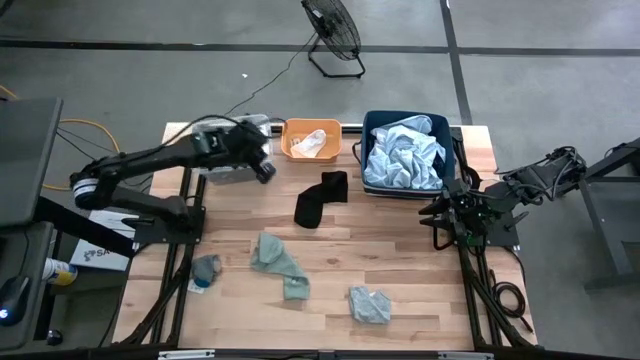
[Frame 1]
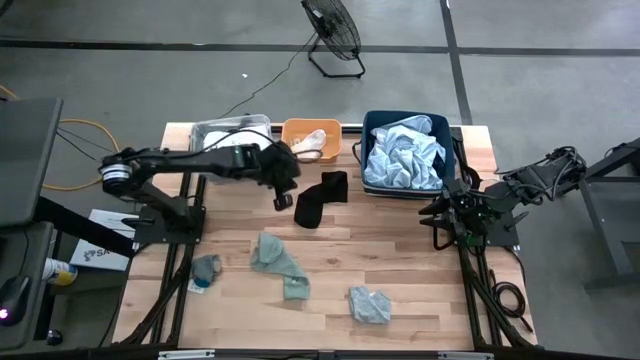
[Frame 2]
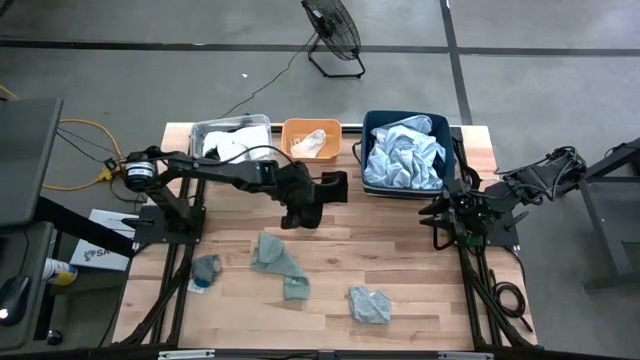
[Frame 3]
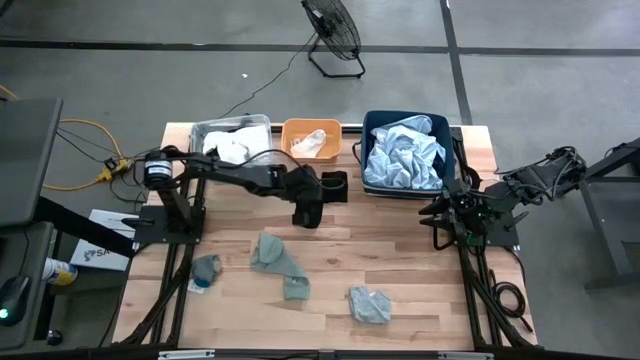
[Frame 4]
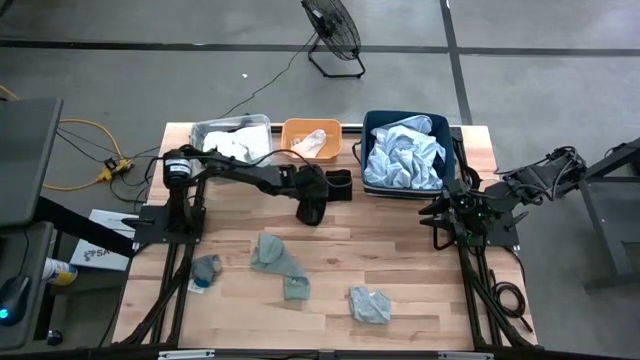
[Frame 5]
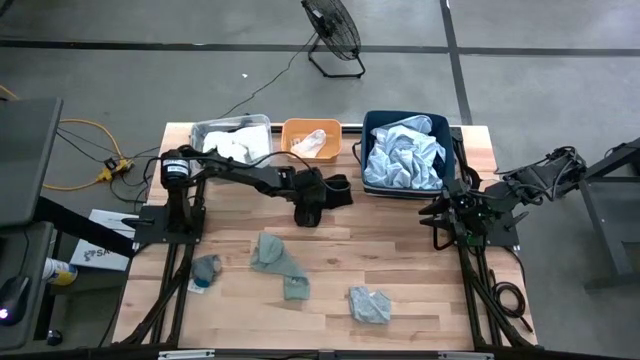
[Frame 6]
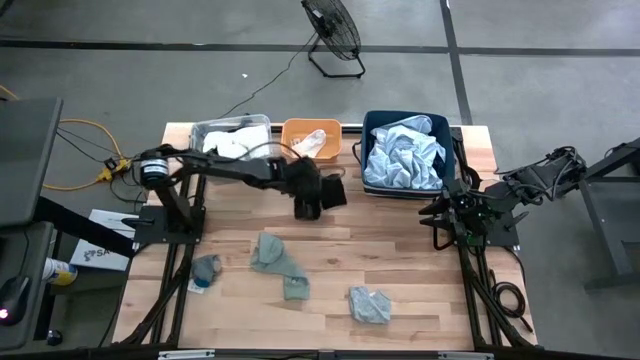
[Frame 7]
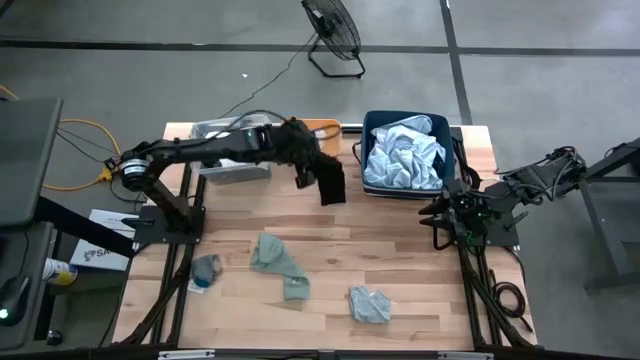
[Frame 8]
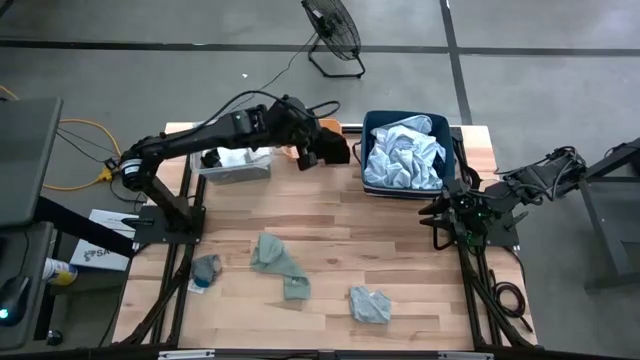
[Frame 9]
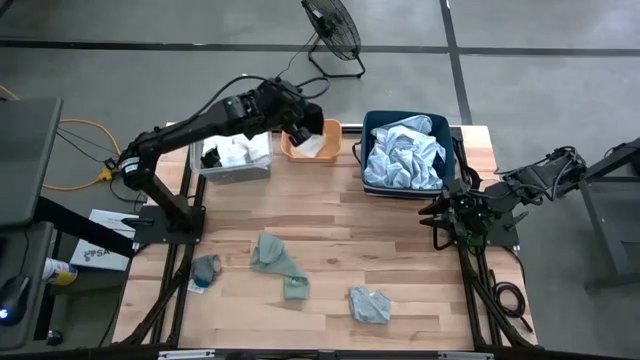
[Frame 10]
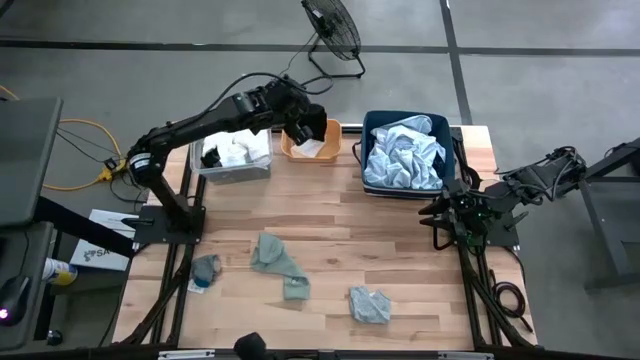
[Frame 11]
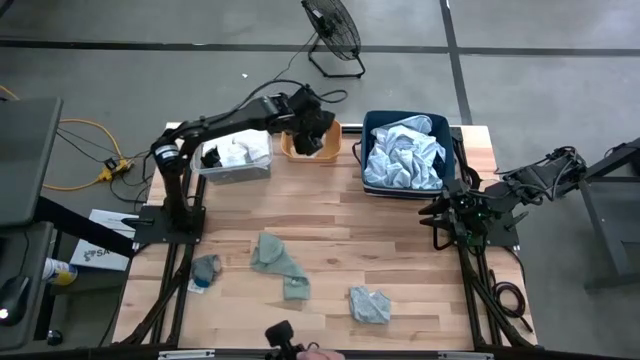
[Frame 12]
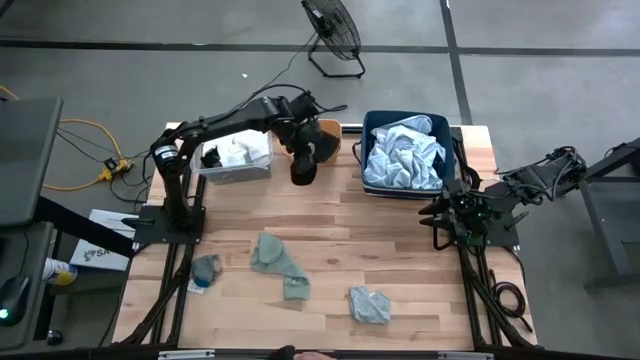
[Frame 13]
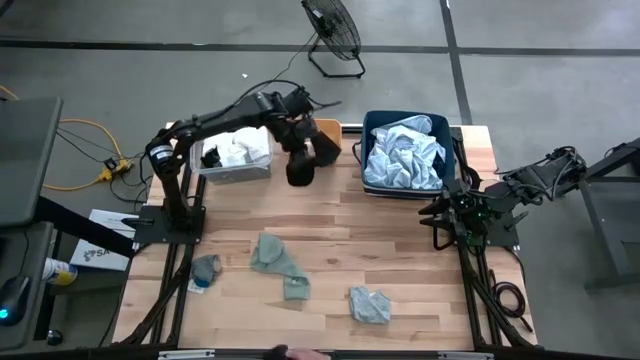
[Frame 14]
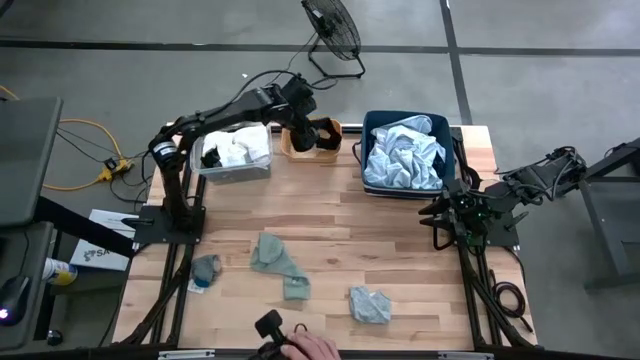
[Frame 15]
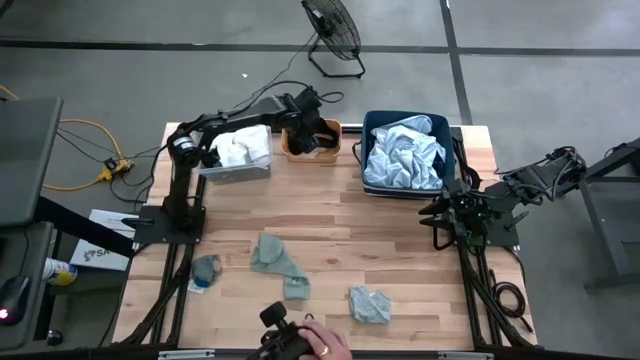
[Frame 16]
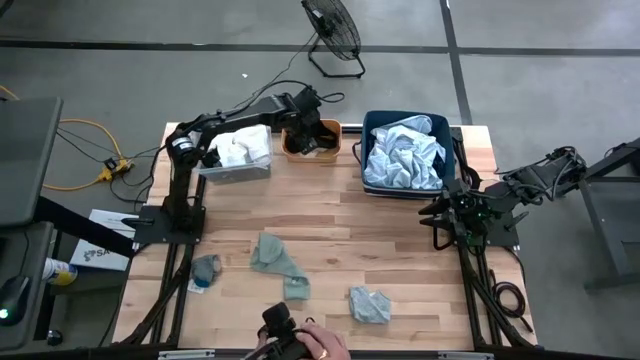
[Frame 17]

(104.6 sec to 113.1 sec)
Task: Pick & Place Cloths
Put the black sock into the yellow bin

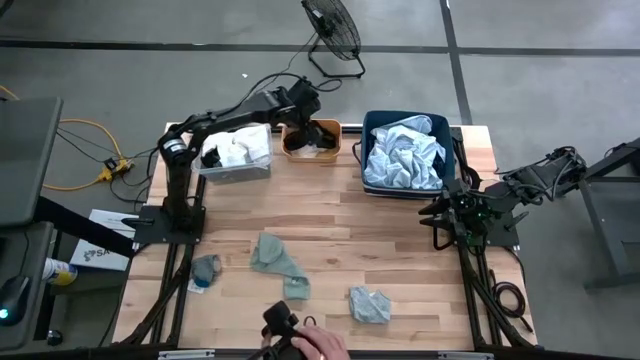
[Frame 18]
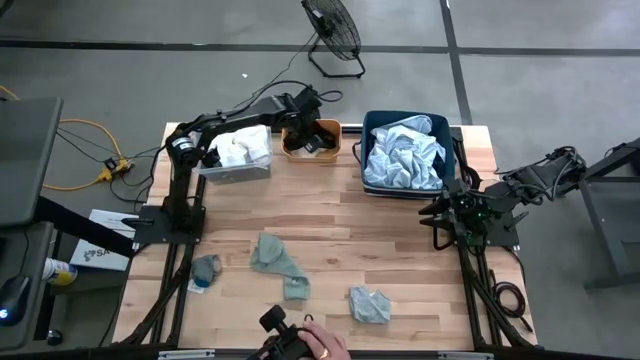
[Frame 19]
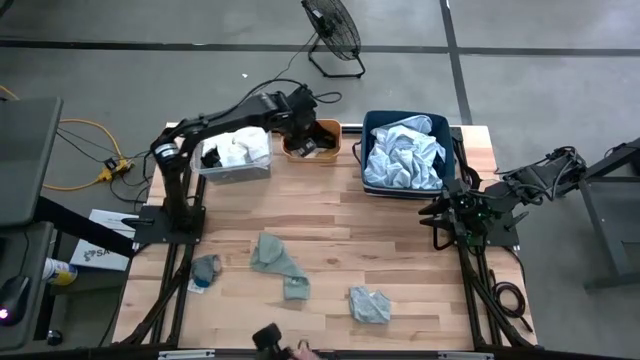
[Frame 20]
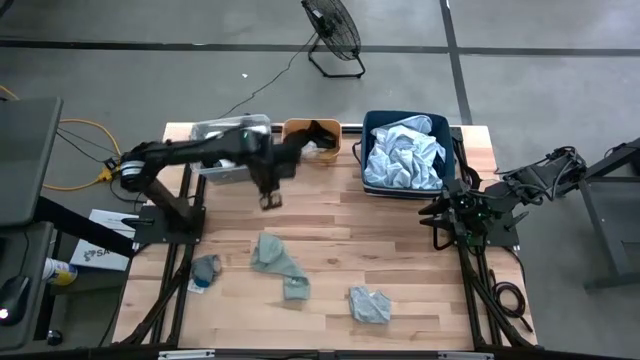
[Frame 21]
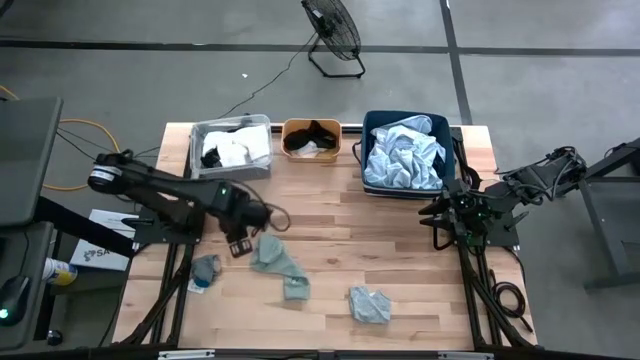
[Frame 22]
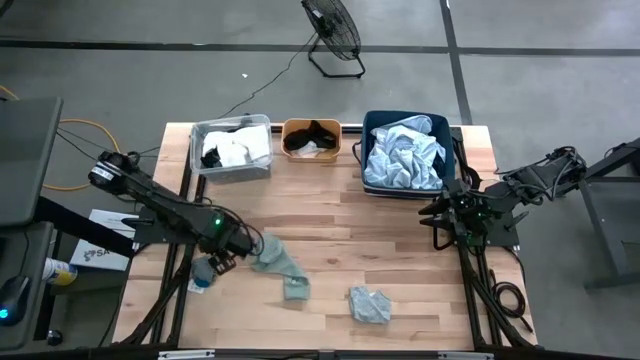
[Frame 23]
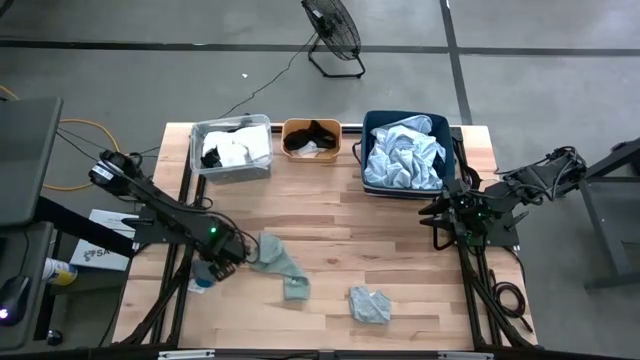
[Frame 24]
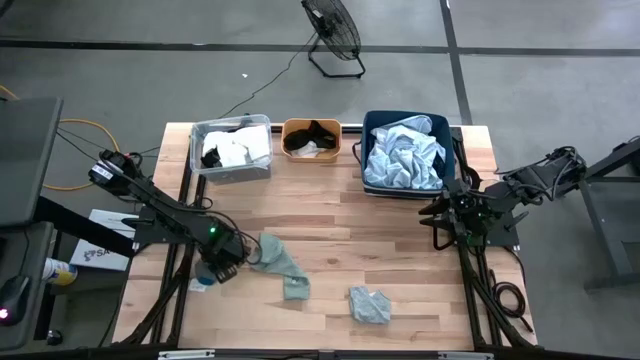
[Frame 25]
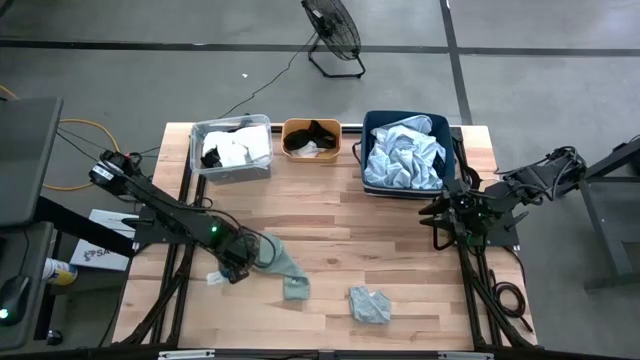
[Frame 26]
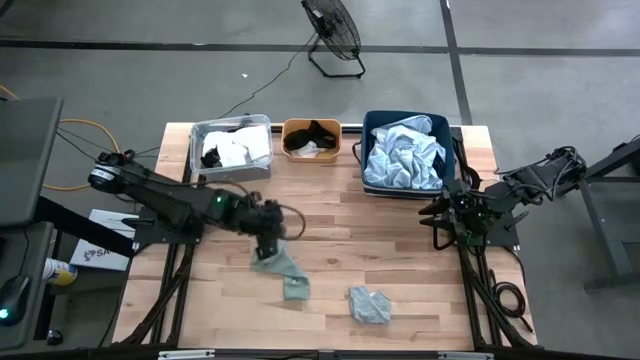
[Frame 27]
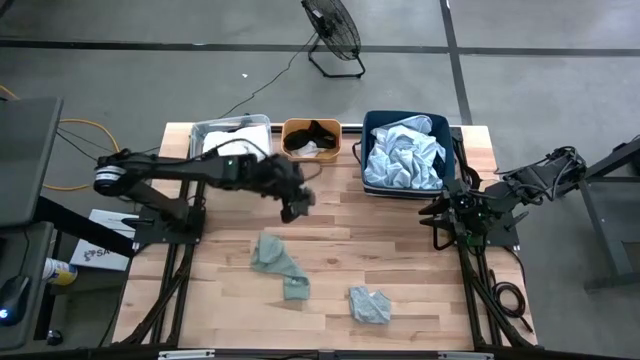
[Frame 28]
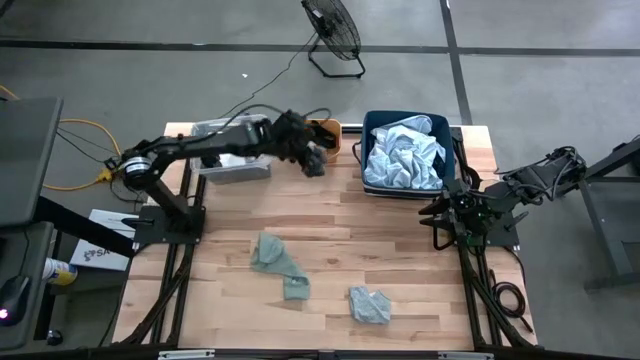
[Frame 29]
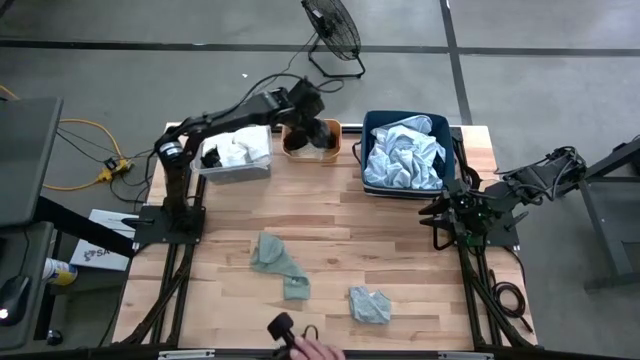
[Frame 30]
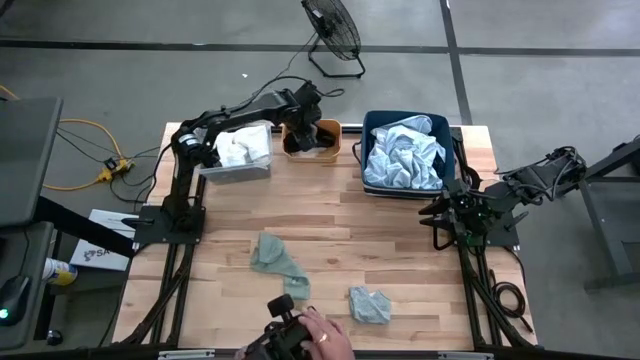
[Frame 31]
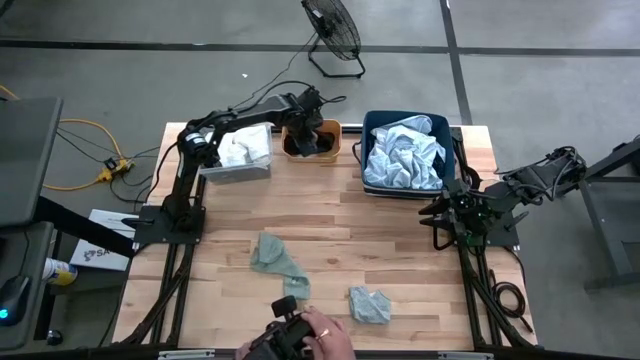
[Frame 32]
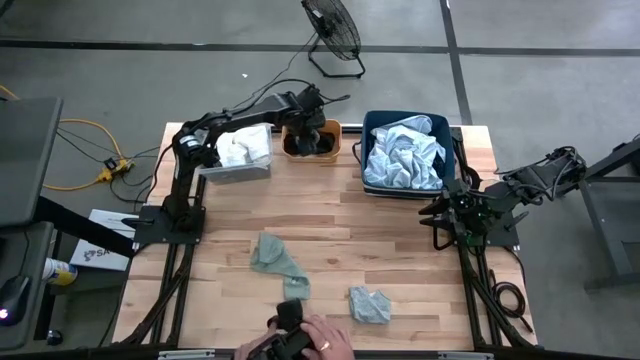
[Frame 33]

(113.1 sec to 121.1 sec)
Put the gray sock into the yellow bin

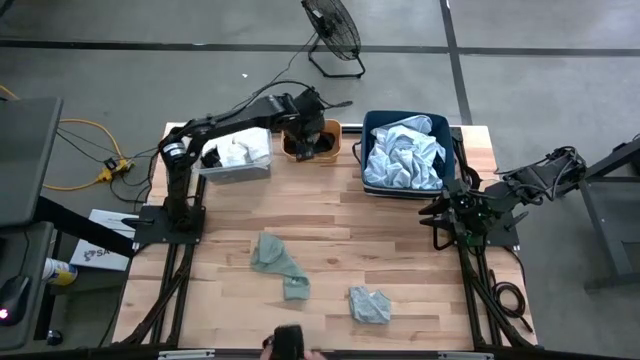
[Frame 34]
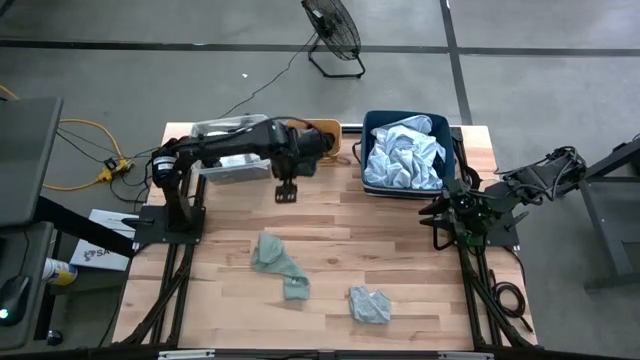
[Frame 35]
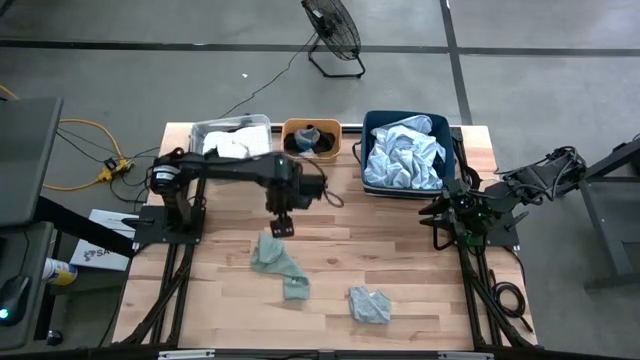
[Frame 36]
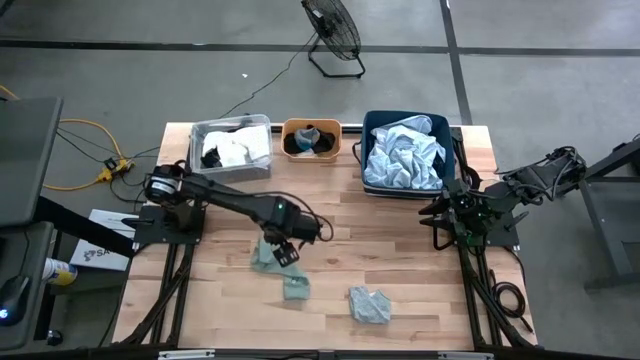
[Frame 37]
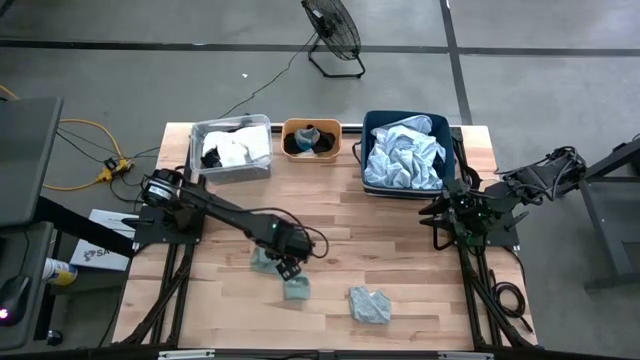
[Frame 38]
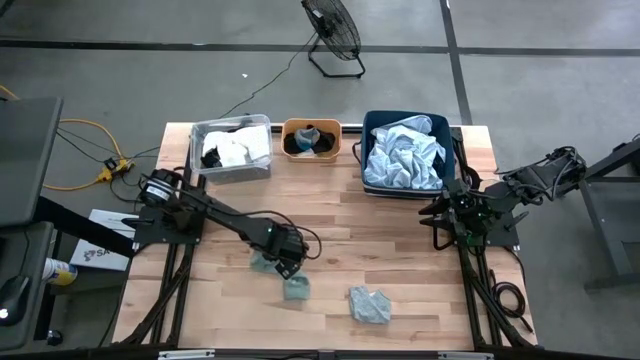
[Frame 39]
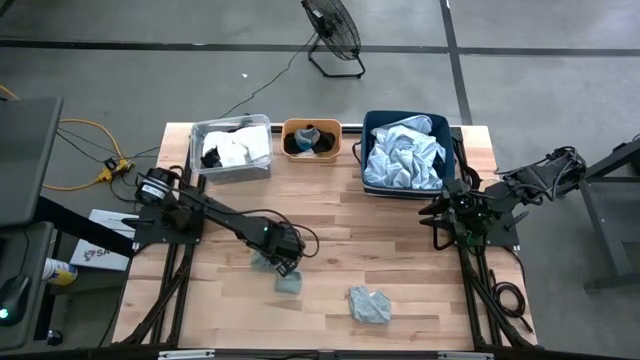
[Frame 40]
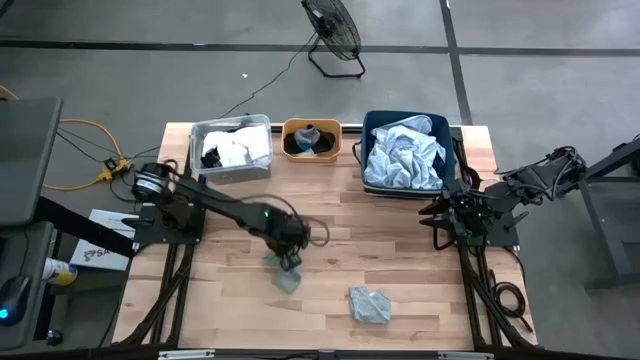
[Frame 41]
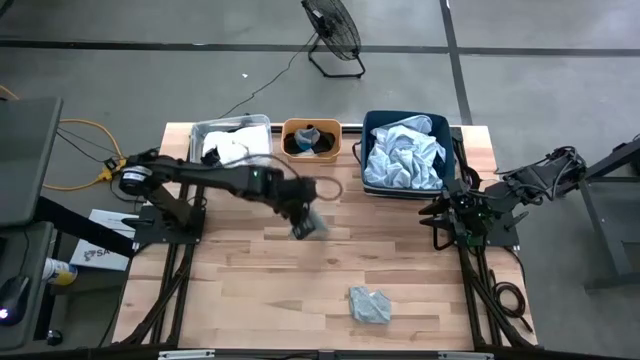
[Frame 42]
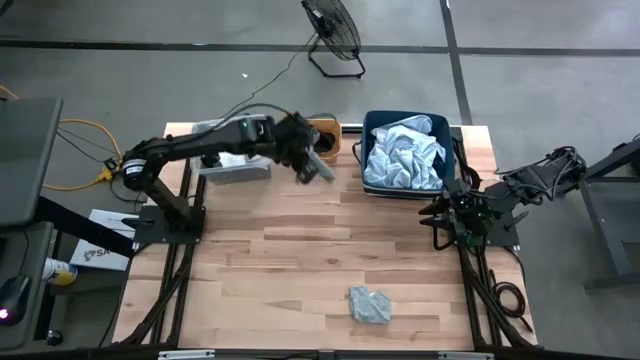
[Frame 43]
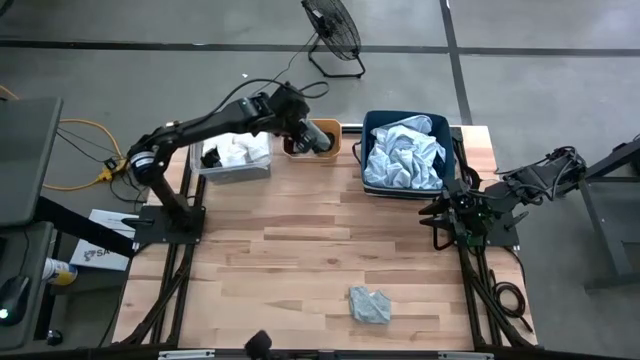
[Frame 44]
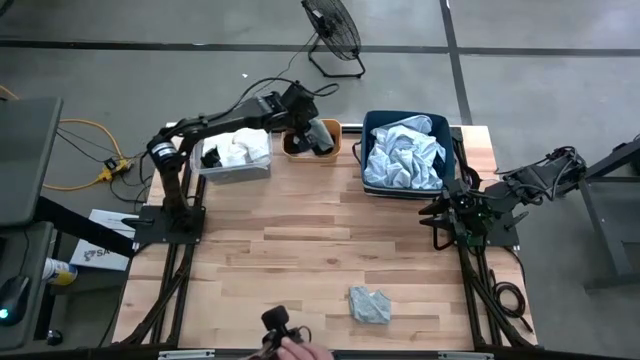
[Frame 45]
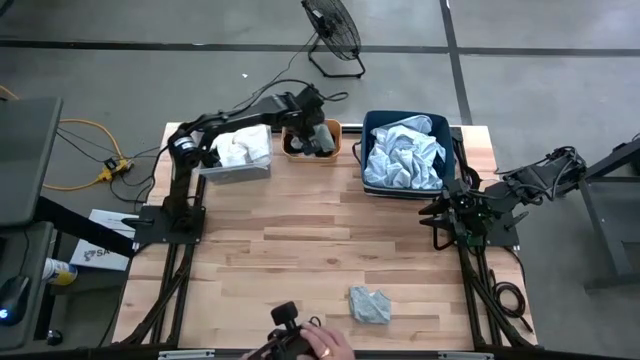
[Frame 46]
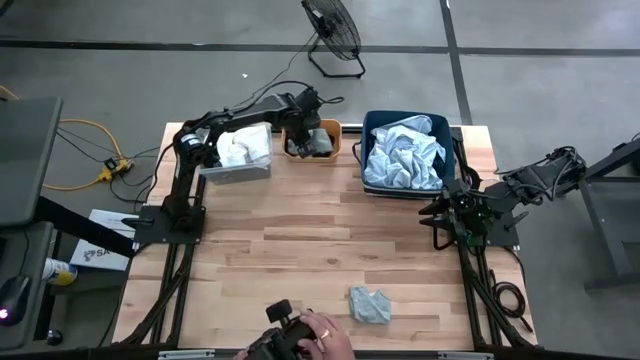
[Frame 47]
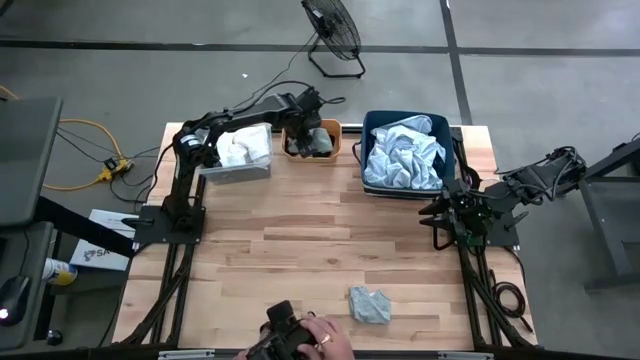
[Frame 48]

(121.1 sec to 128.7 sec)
Put the dark gray sock into the yellow bin
